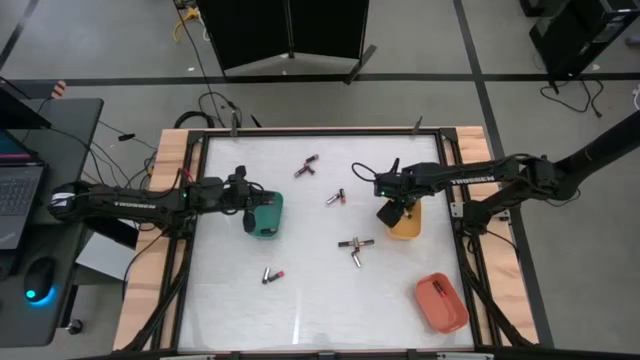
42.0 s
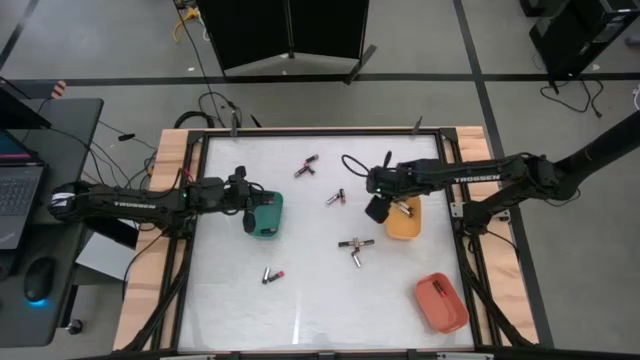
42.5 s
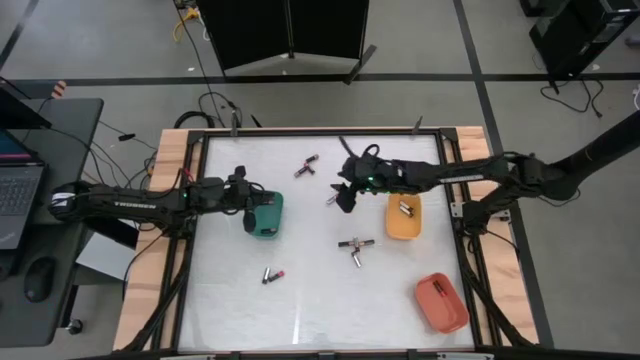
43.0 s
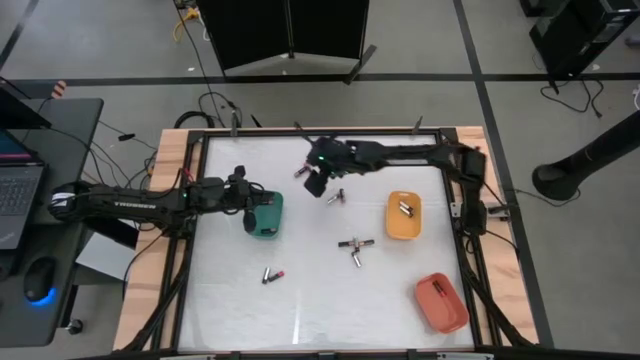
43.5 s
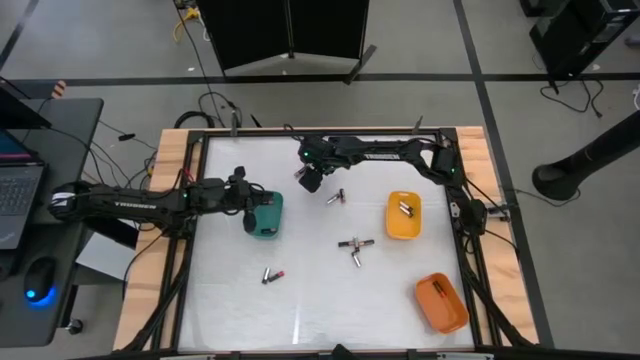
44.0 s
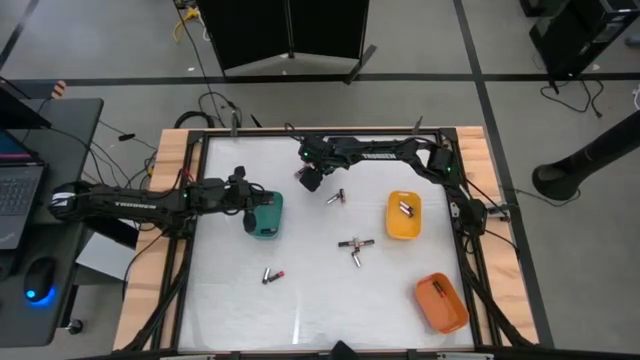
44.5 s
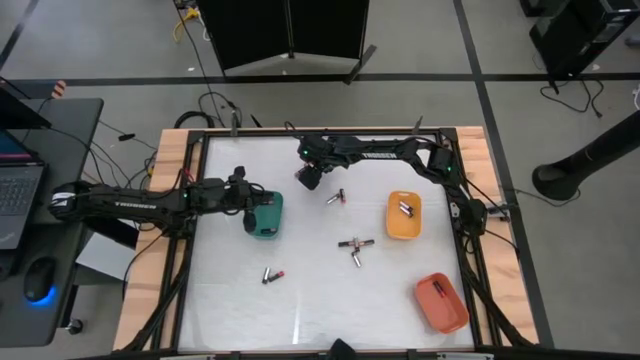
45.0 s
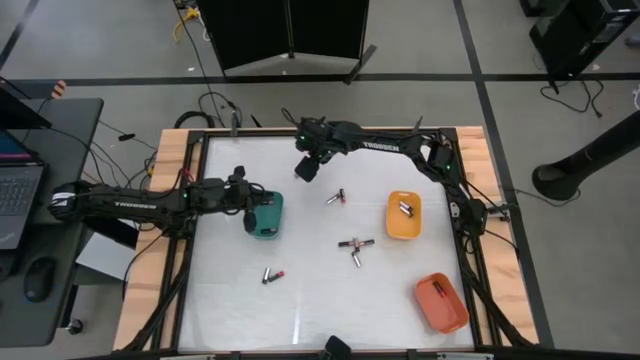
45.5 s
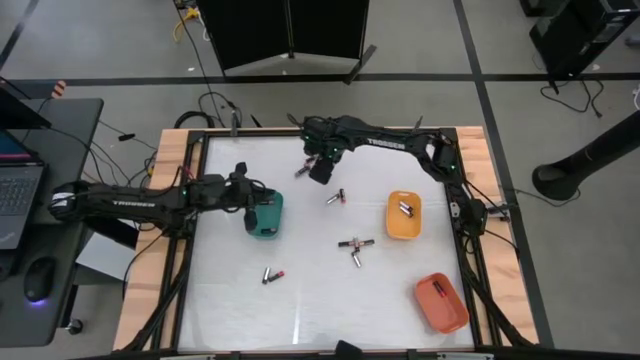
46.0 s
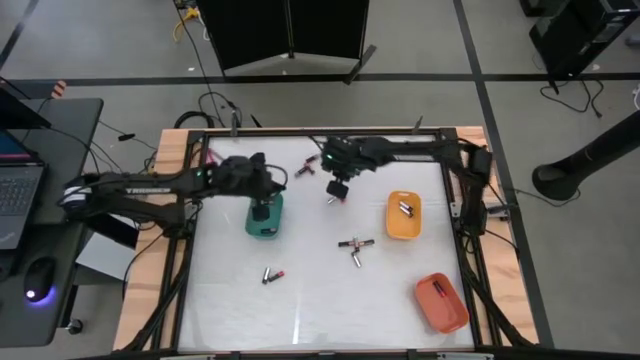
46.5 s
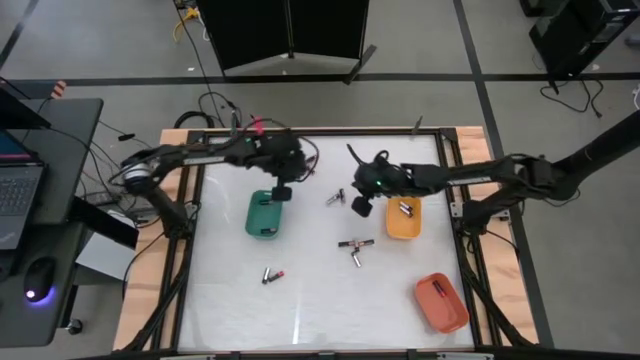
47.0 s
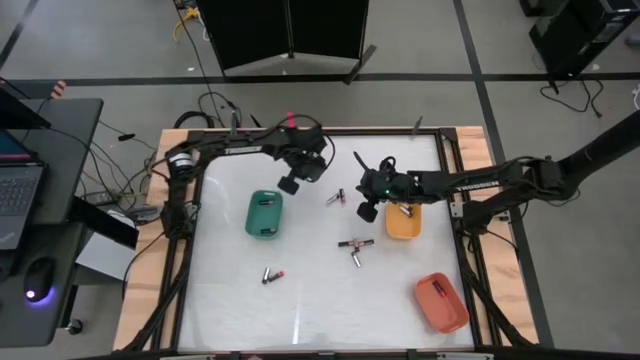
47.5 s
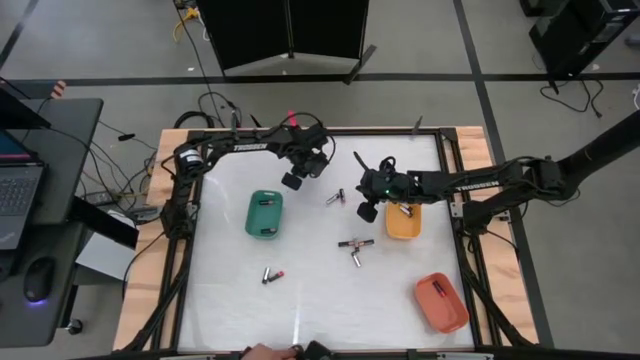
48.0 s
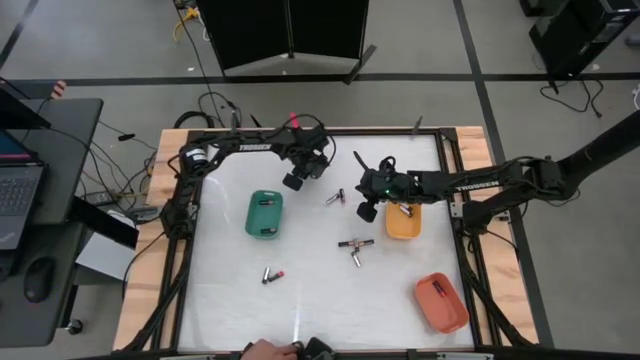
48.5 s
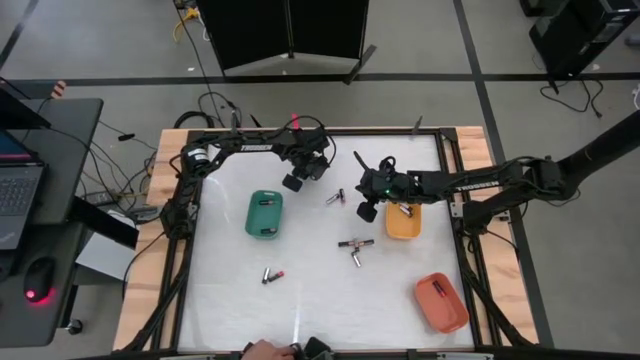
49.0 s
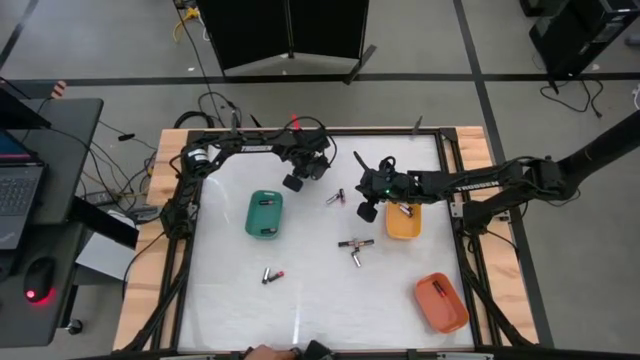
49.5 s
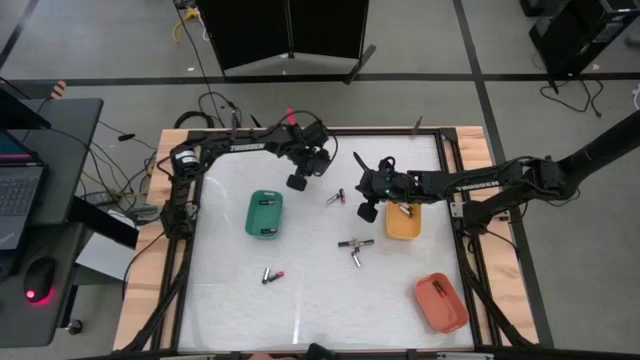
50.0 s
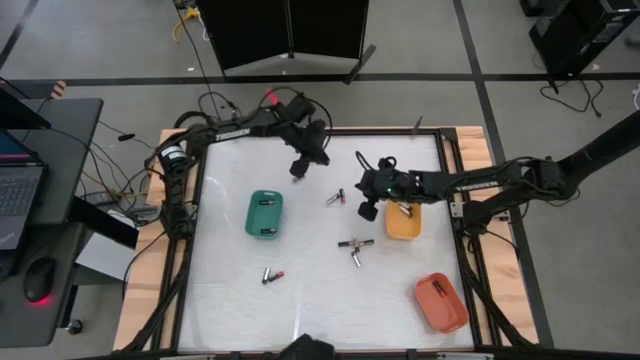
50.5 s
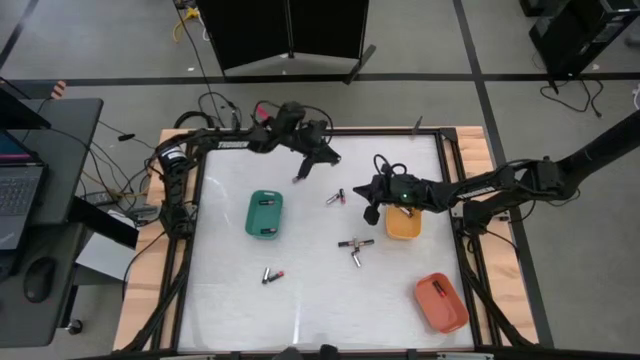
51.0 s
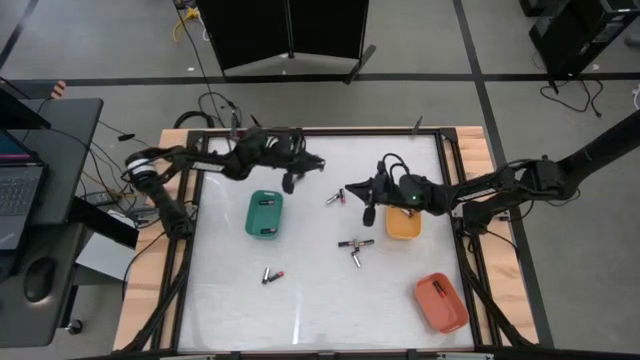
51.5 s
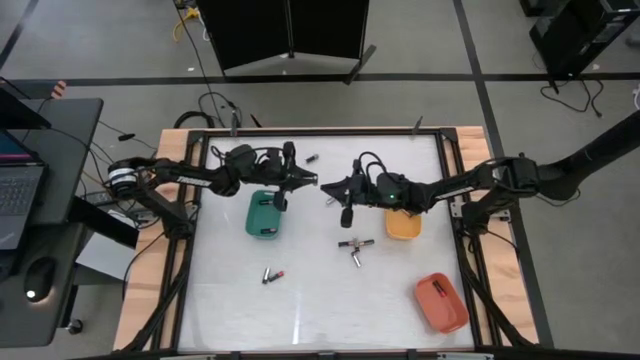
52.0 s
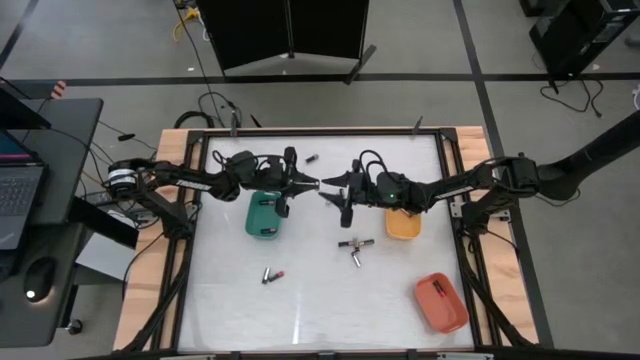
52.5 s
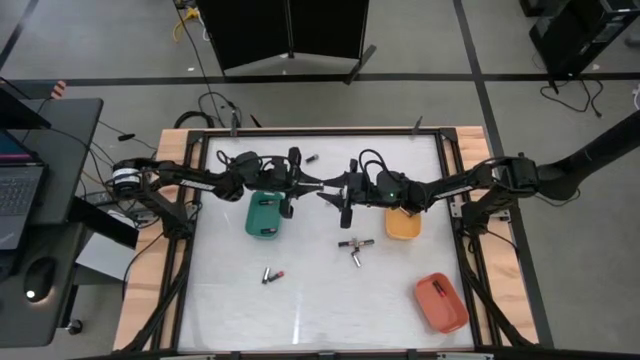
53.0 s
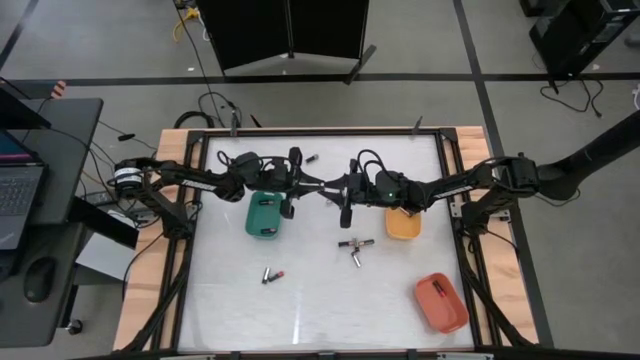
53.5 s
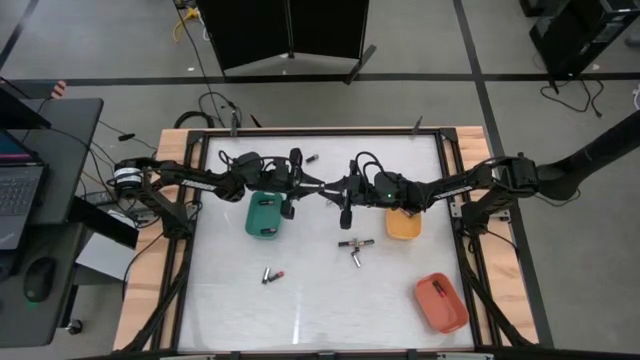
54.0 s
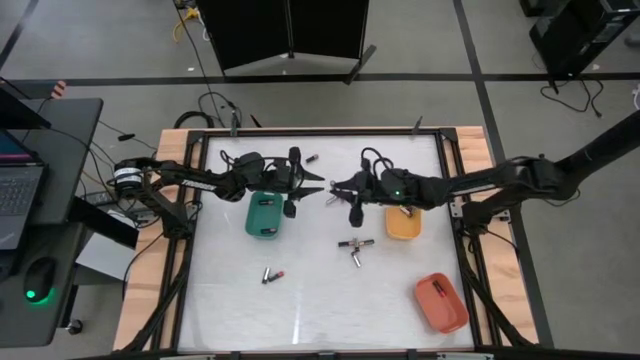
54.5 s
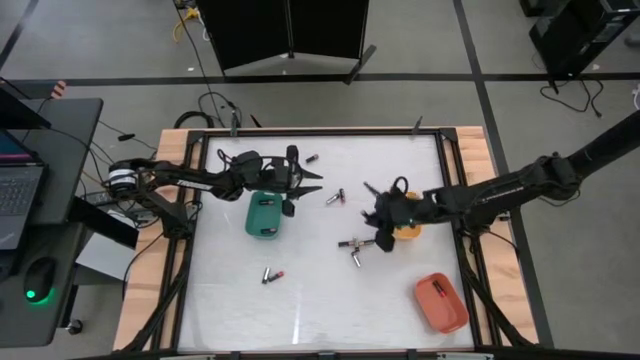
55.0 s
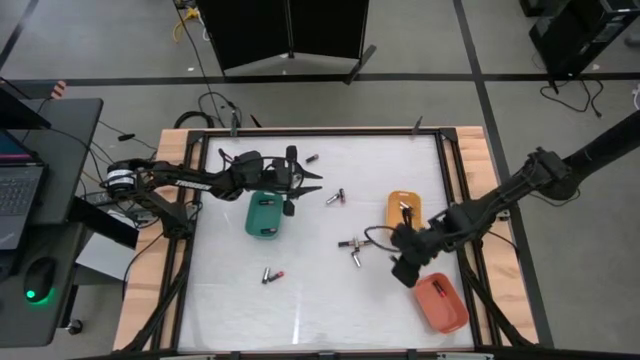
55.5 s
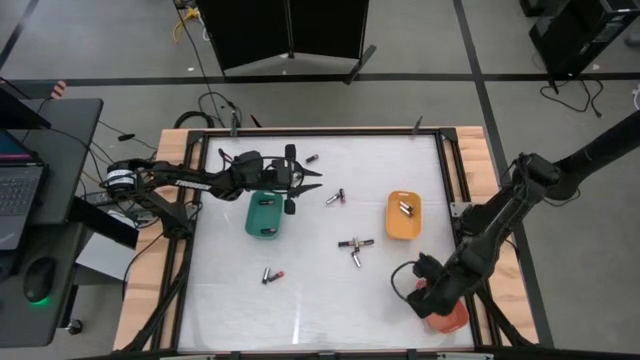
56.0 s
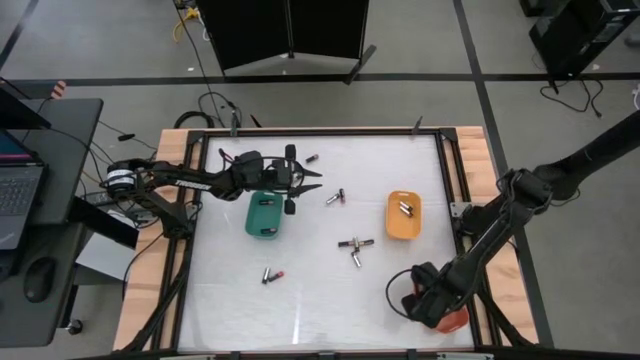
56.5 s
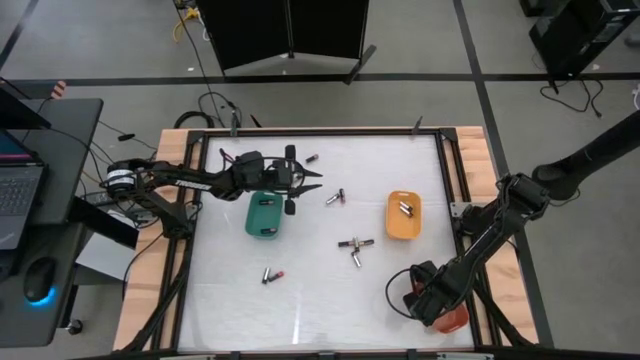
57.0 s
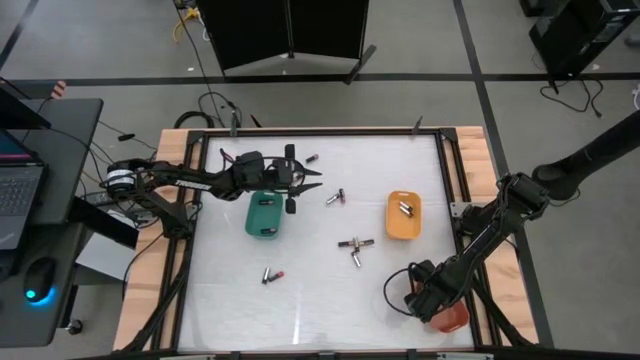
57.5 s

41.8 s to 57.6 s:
Task: Sort batteries
Put the black and red battery into the orange bin

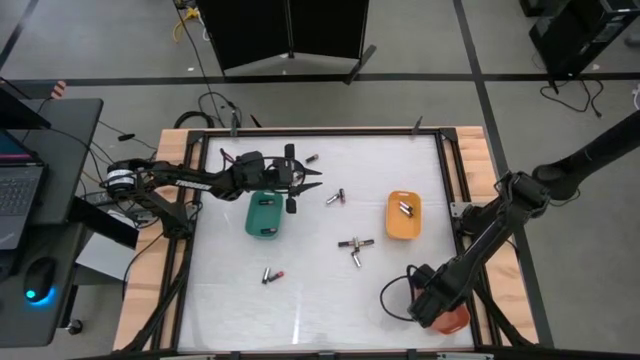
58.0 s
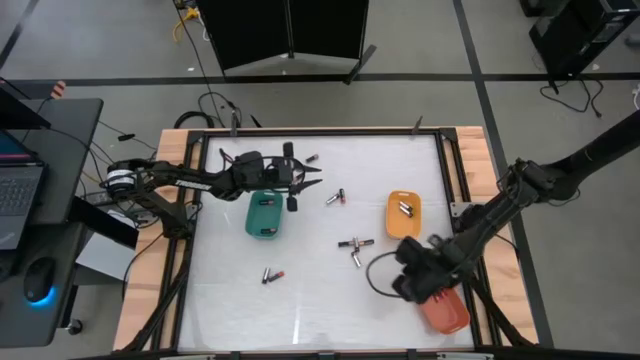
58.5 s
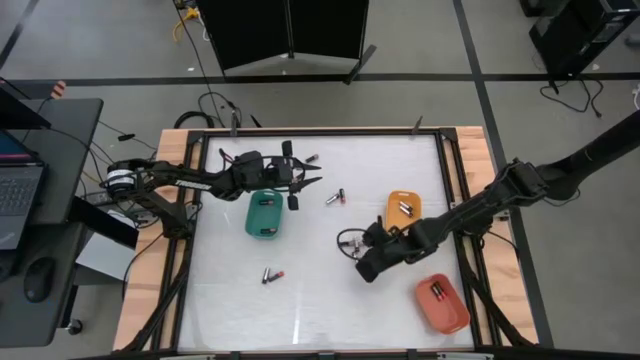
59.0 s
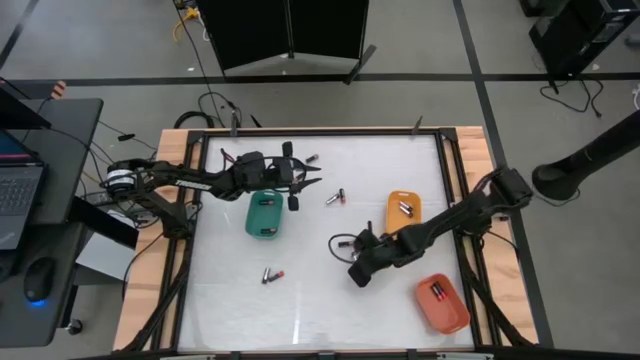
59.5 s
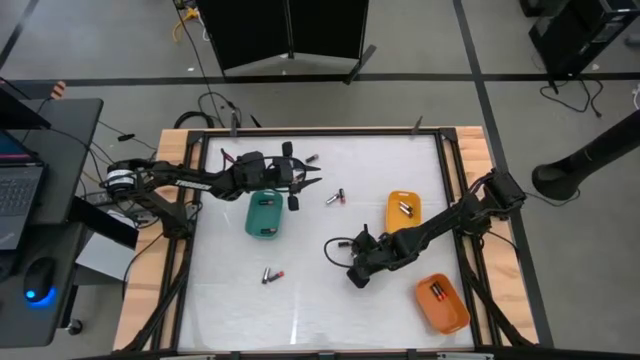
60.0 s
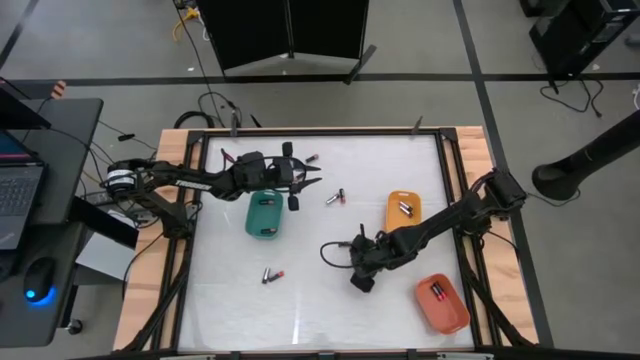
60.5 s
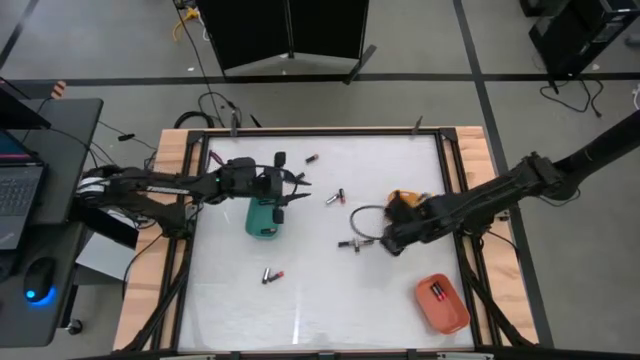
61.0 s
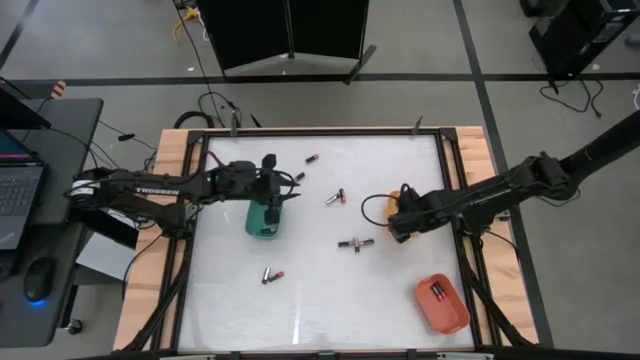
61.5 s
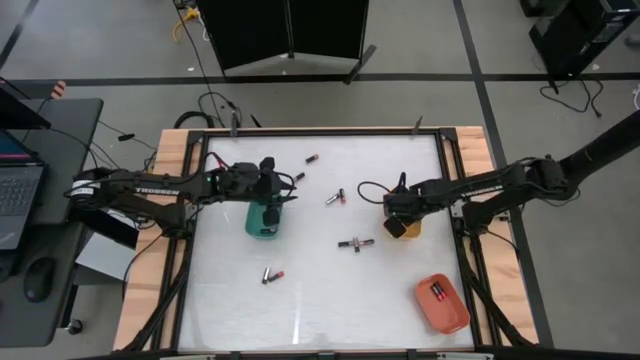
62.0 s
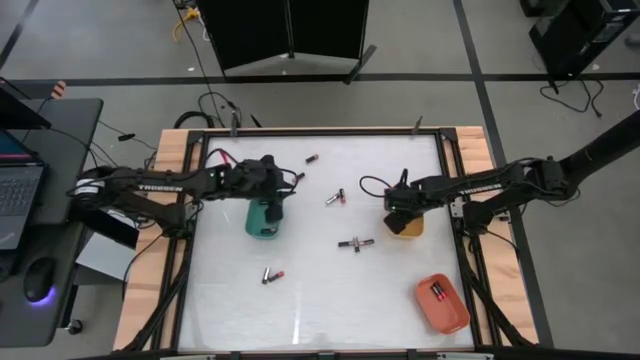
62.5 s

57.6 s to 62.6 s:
Put the silver battery into the yellow bin
